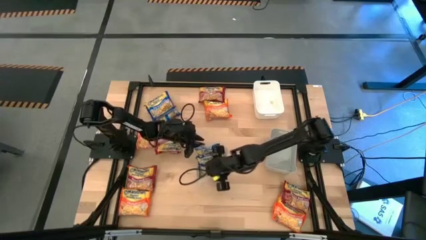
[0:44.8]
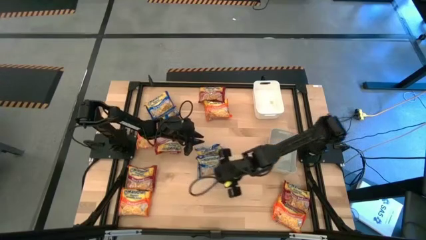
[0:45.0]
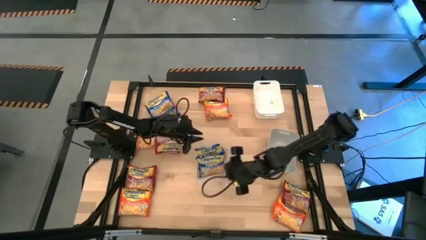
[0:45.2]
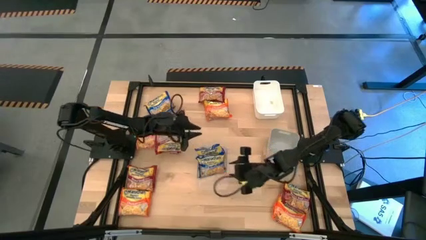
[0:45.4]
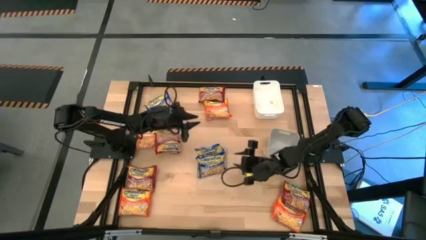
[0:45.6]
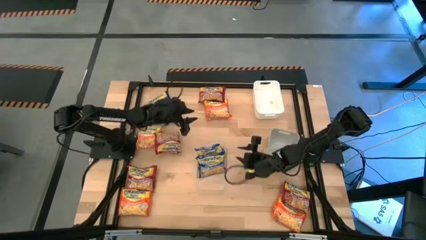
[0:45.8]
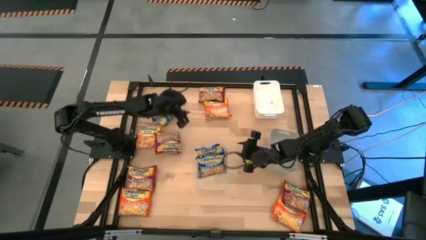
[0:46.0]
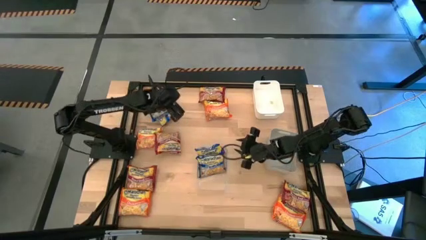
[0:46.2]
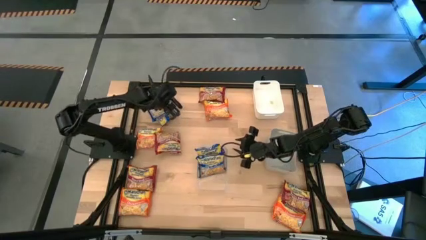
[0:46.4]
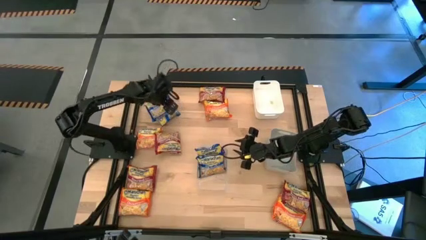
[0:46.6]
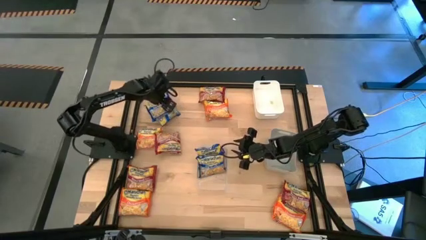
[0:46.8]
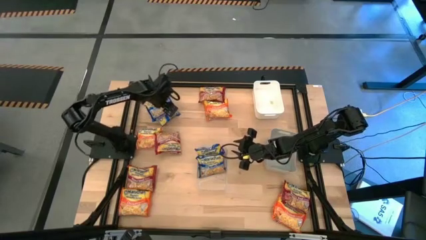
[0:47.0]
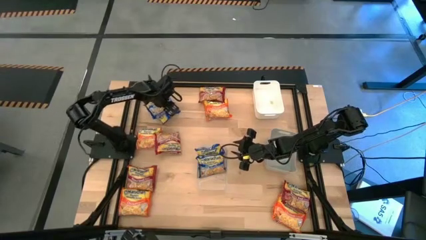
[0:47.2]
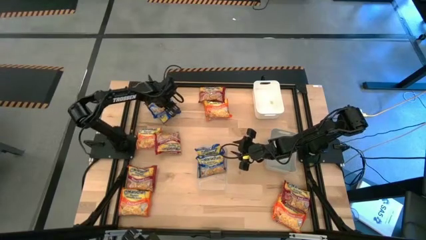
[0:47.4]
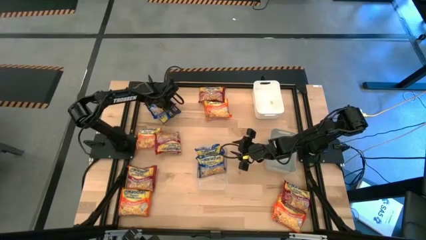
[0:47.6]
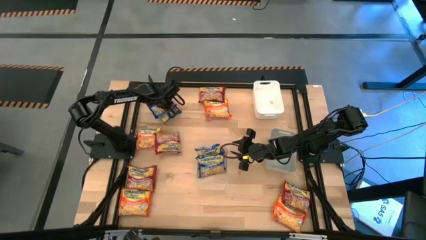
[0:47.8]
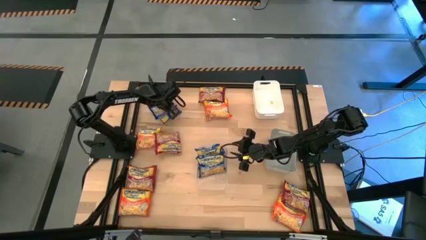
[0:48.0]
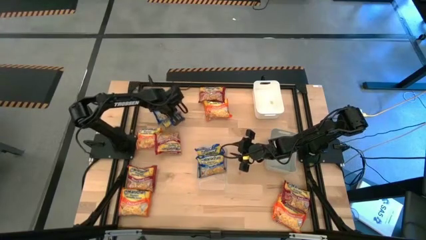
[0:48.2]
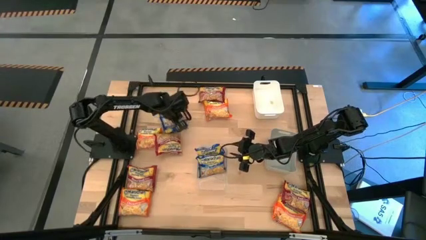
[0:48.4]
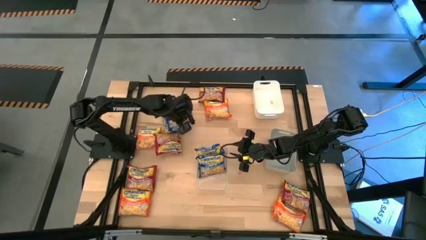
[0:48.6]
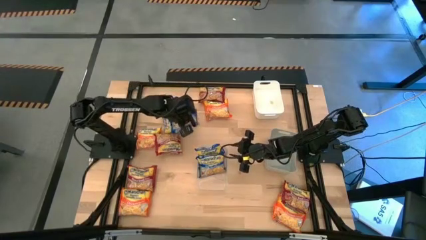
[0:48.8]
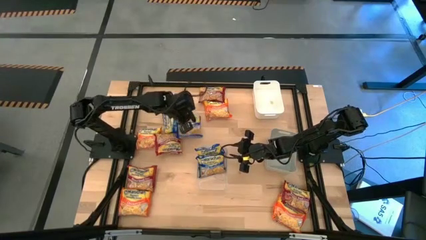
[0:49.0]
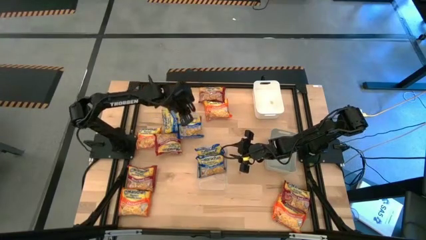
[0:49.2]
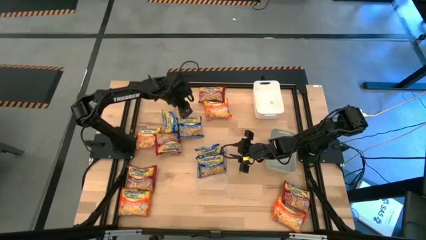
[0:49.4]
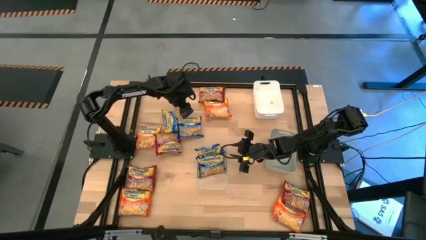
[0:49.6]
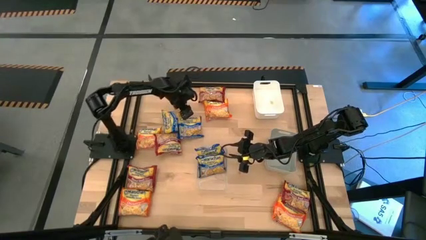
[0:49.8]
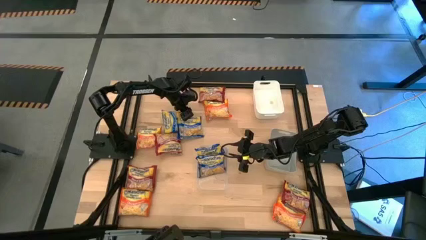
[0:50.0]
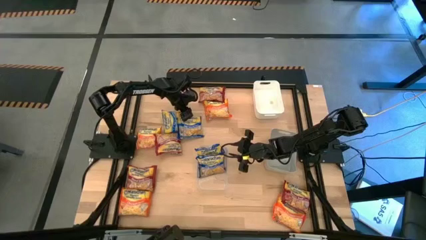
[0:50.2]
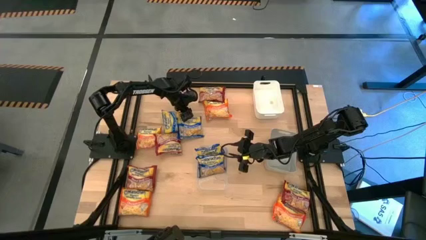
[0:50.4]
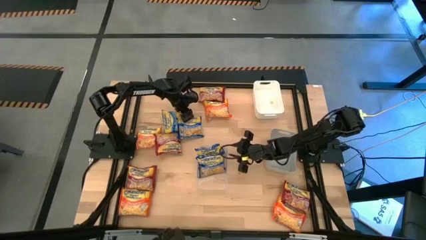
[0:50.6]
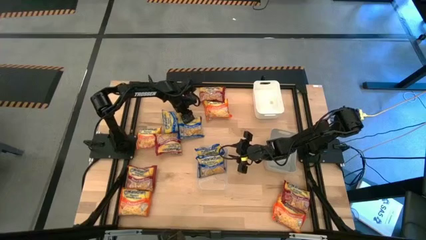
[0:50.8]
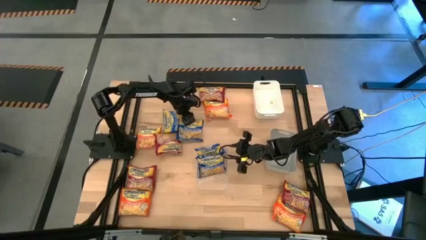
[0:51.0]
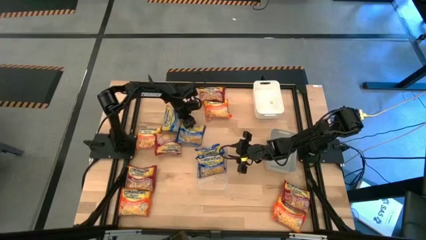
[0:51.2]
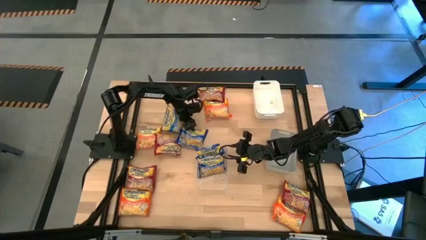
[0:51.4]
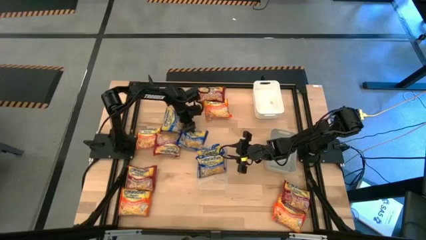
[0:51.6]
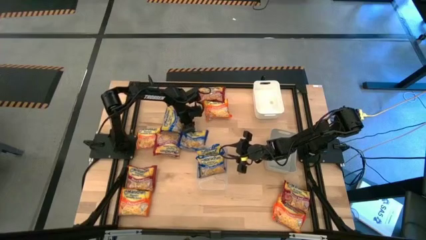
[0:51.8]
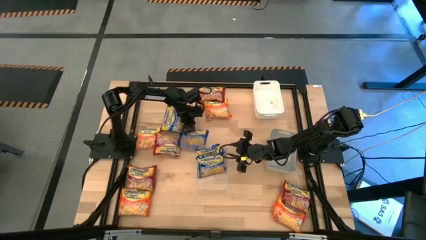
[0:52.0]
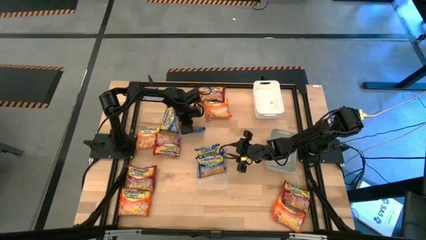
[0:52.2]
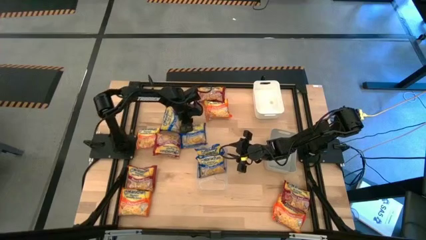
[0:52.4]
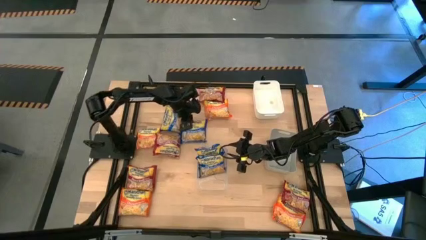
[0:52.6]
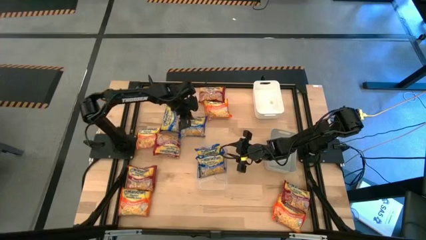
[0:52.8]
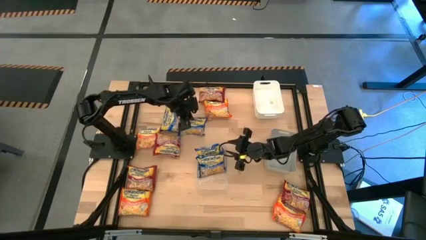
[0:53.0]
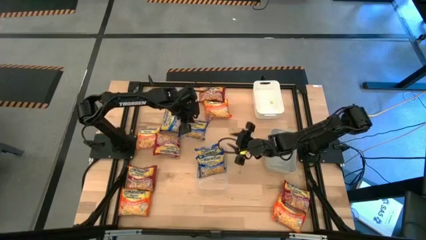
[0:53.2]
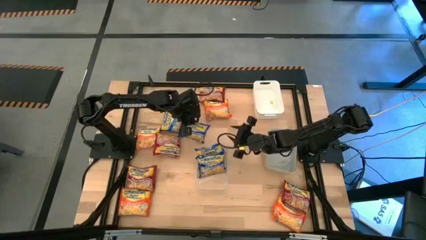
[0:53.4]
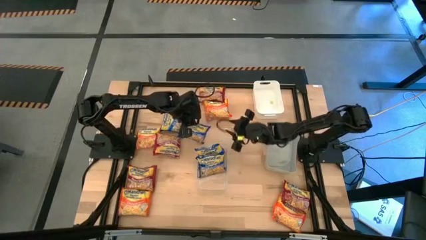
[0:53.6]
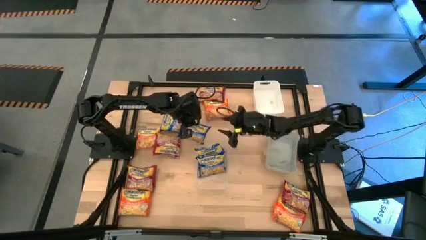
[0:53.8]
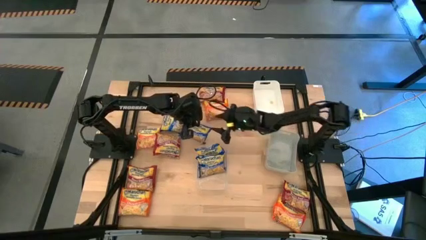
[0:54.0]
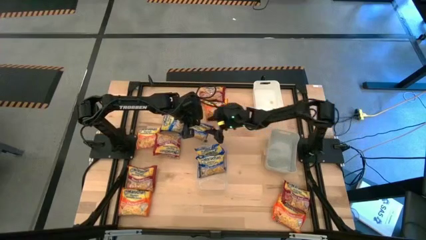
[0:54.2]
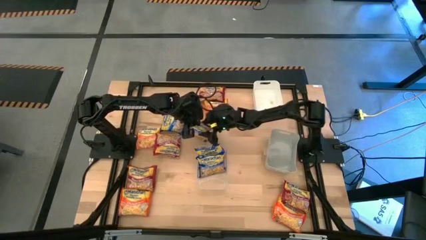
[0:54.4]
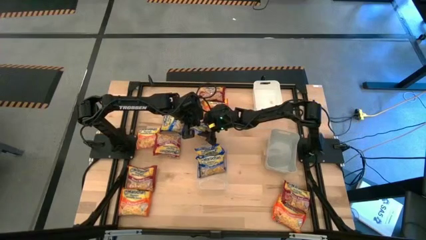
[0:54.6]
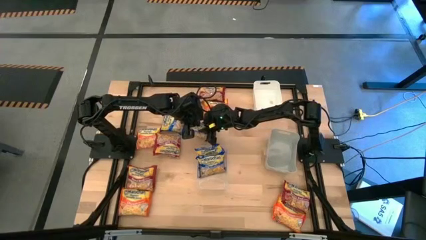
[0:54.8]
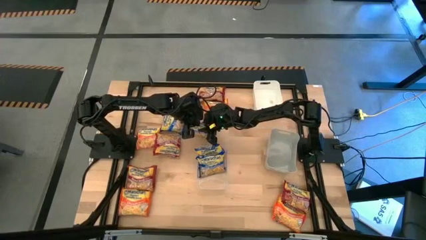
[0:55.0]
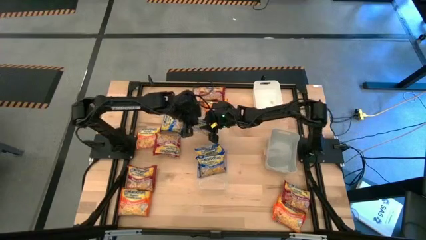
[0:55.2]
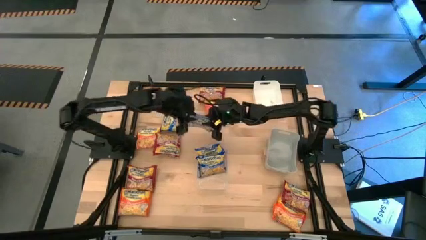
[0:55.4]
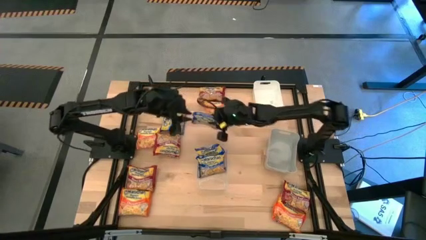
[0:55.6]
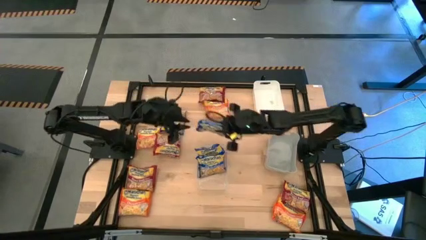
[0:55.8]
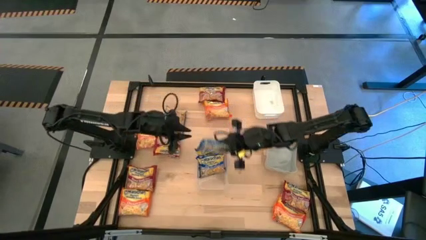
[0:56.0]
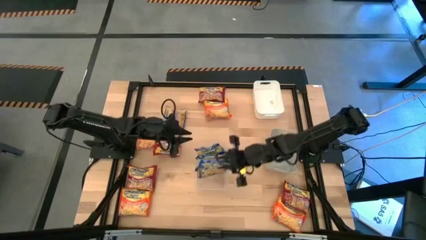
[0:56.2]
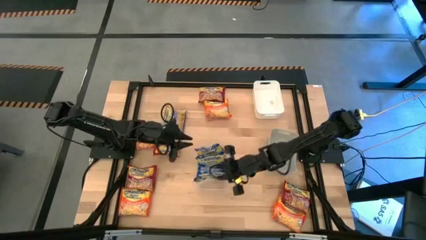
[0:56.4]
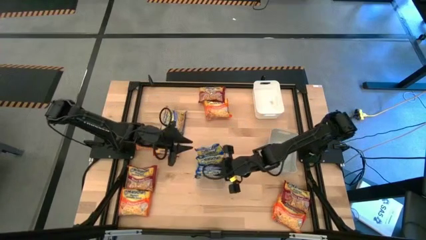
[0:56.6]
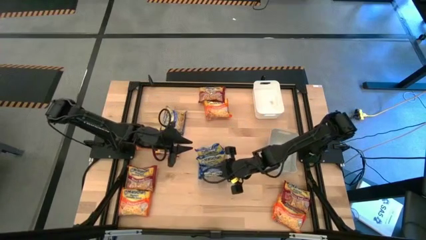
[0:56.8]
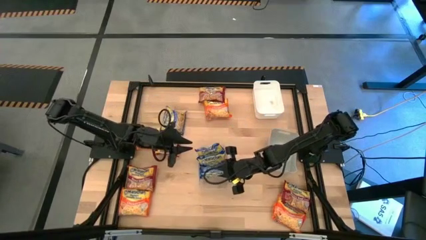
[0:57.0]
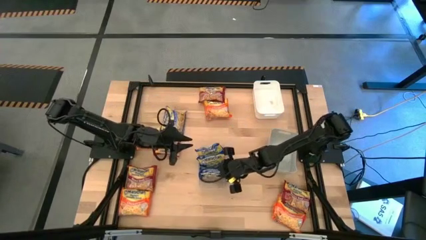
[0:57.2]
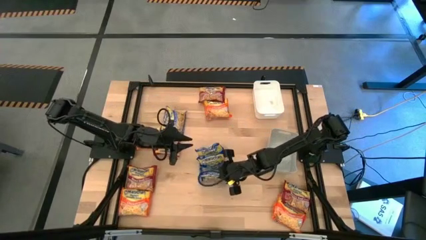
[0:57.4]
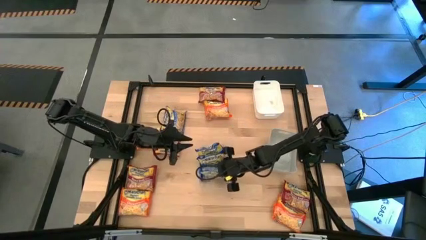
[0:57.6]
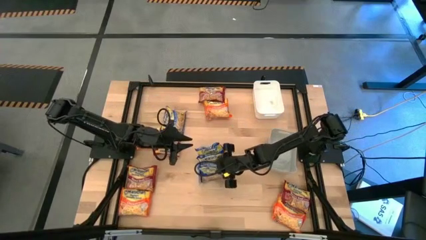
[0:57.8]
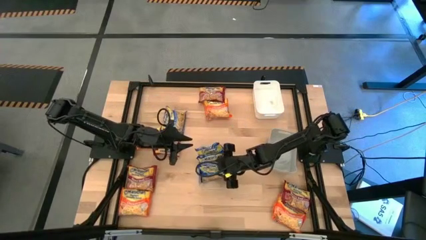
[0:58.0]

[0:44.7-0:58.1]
Task: Sort Maruchan noodles
Put the top blue noodle pack into the transparent bin
